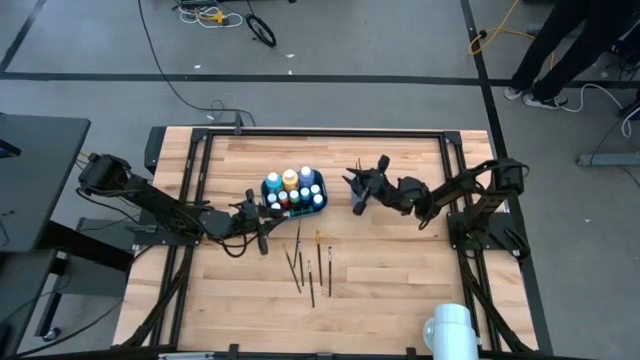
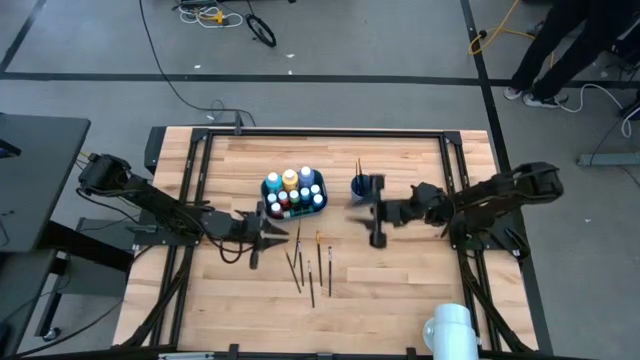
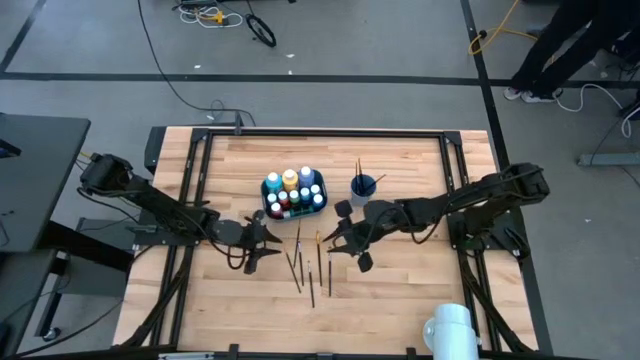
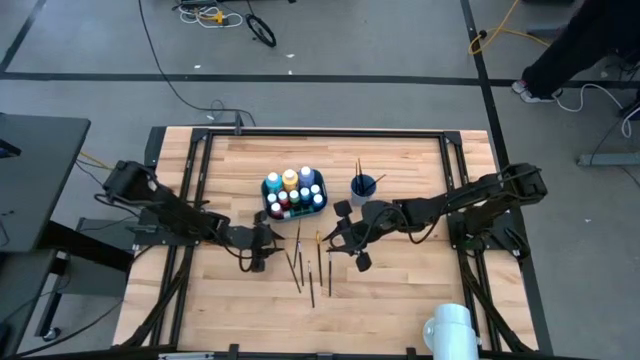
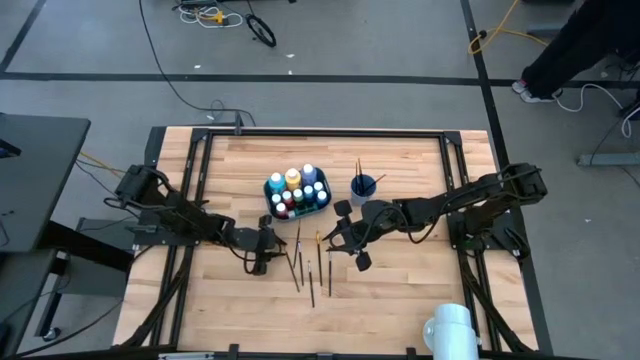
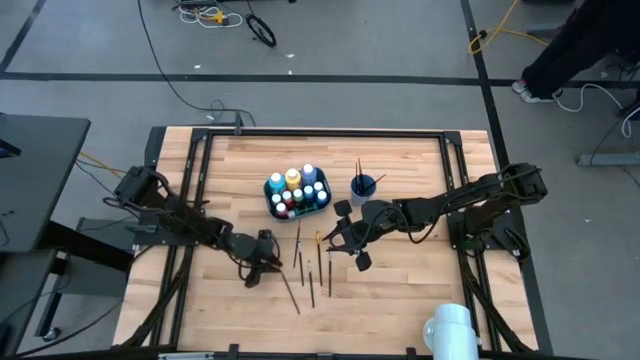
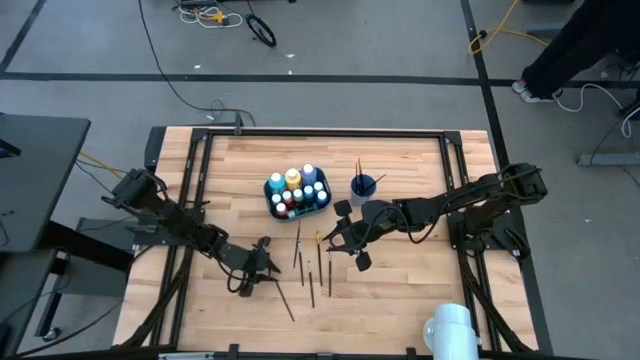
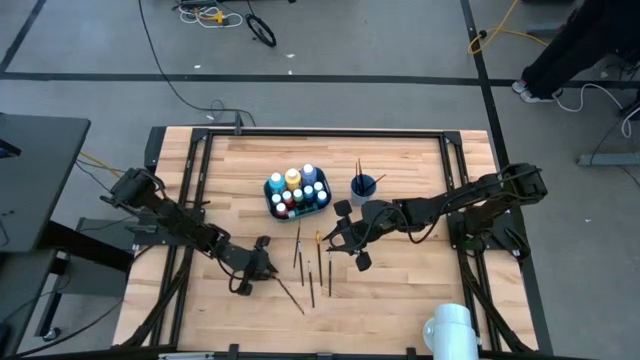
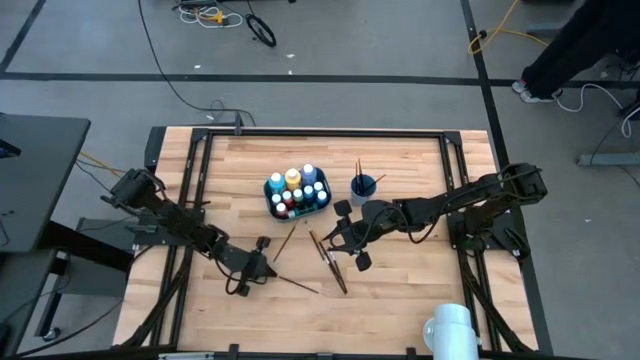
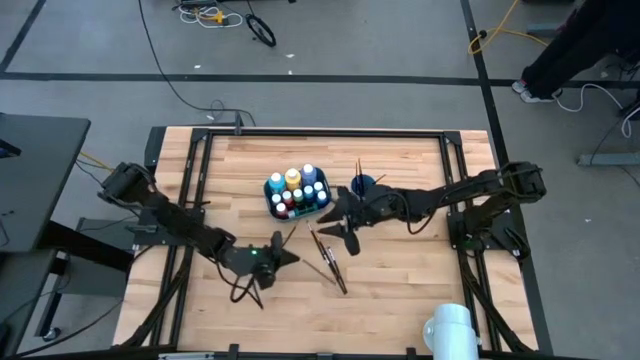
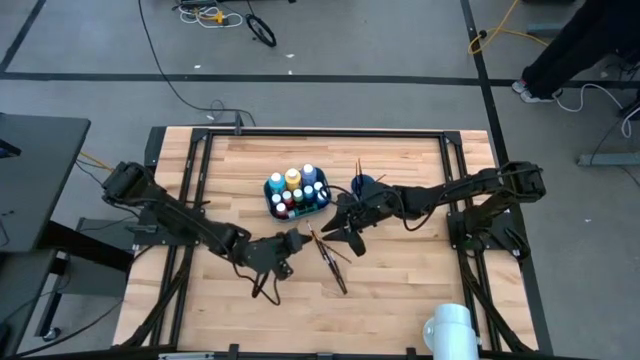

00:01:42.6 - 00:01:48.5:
Task: Pick & Place Paint Supplies
Put the orange paint brush into the blue cup

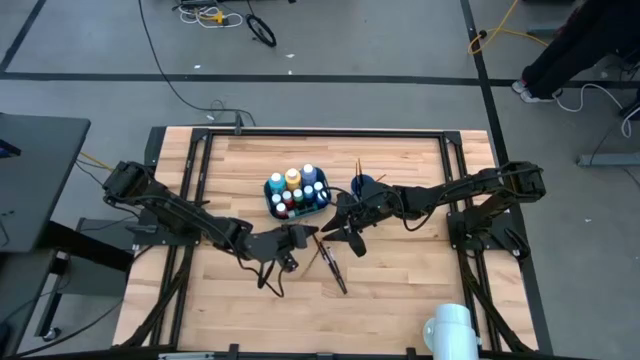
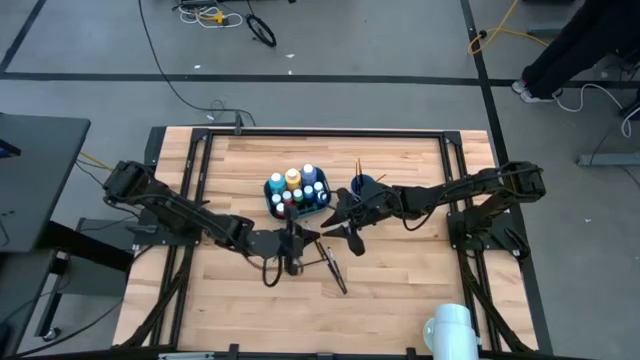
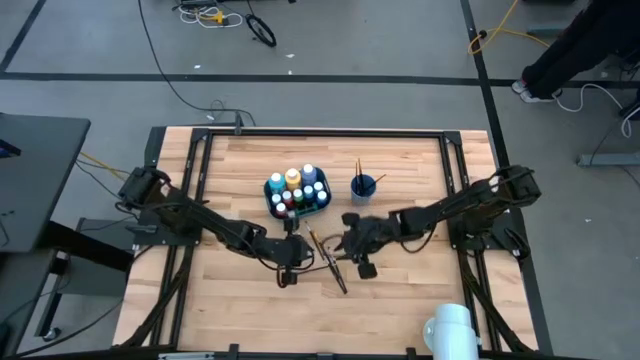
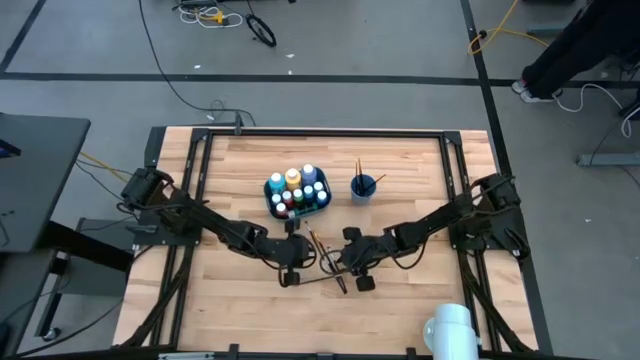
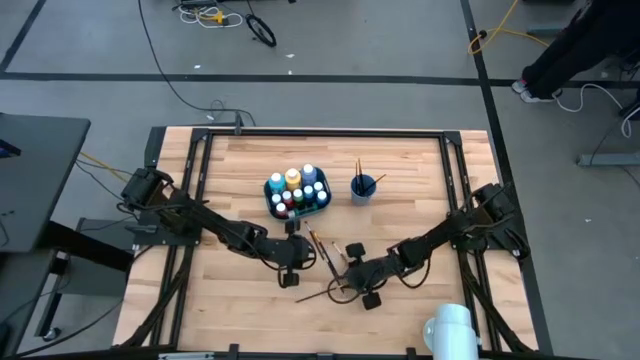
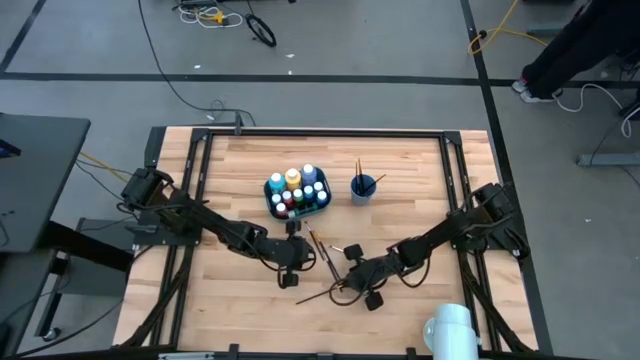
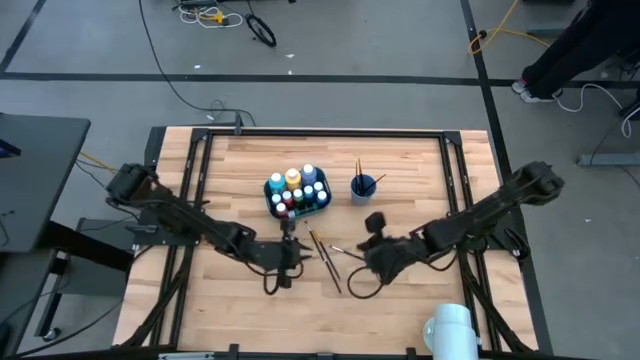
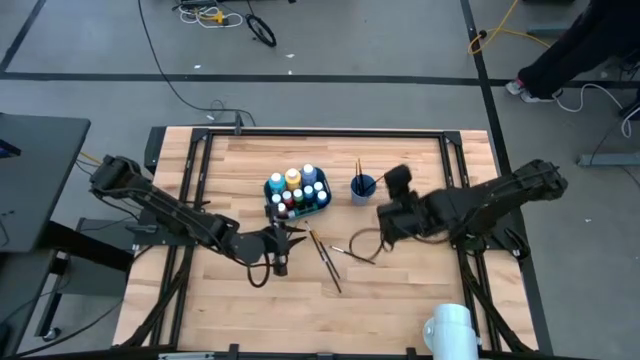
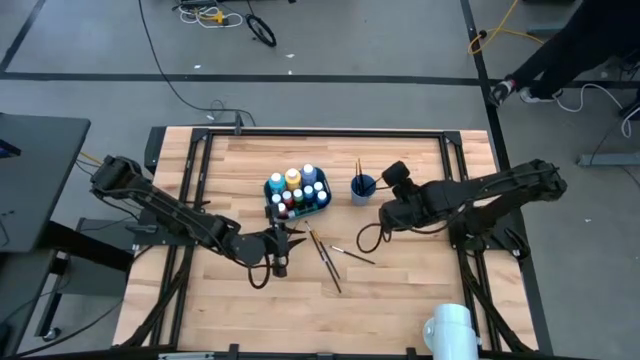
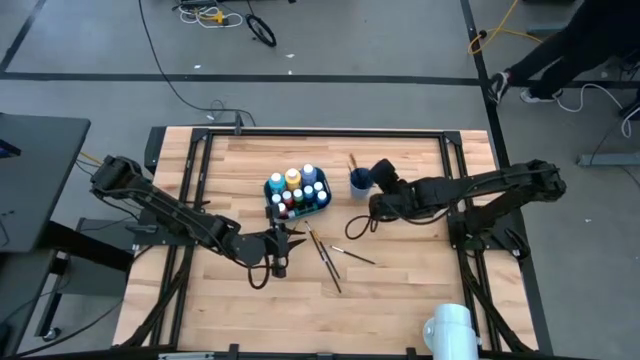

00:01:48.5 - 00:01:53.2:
Put the orange paint brush into the blue cup

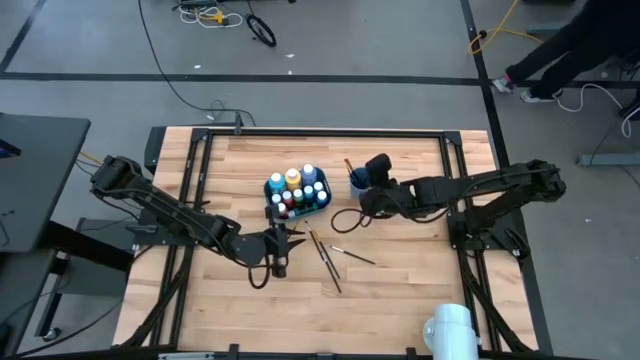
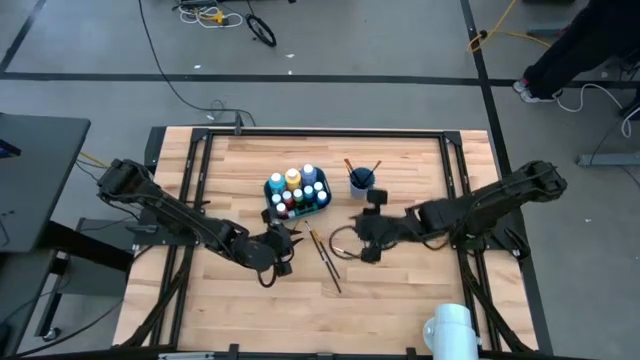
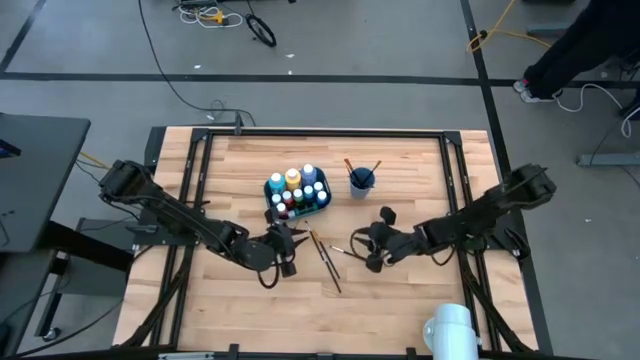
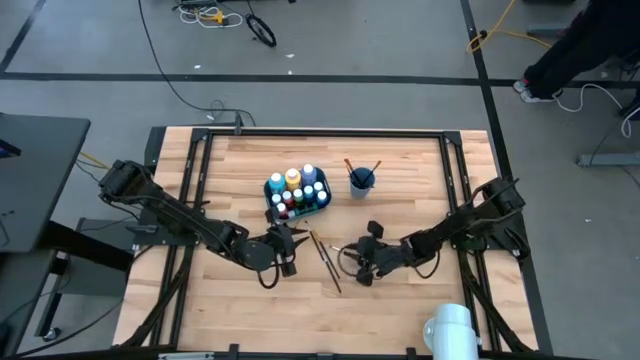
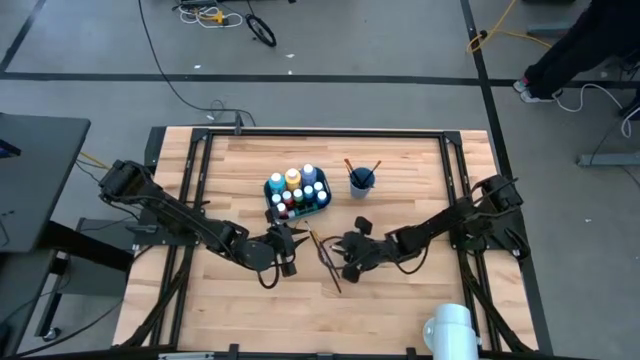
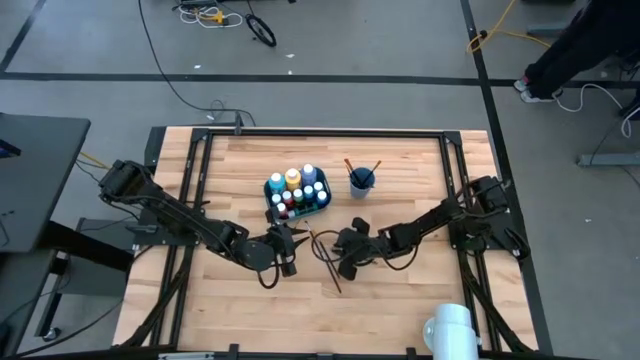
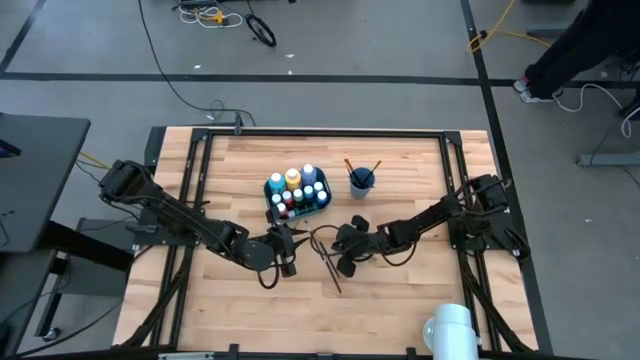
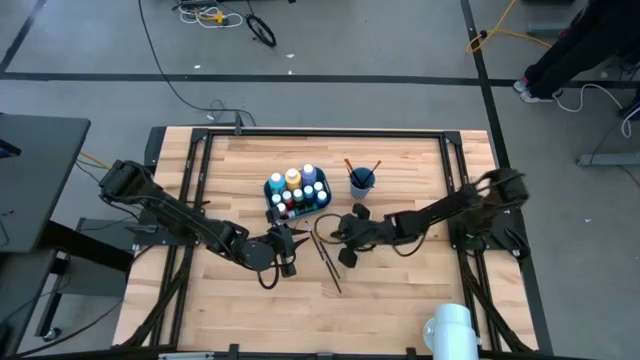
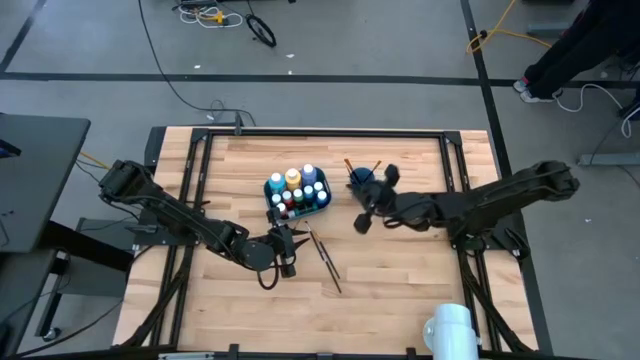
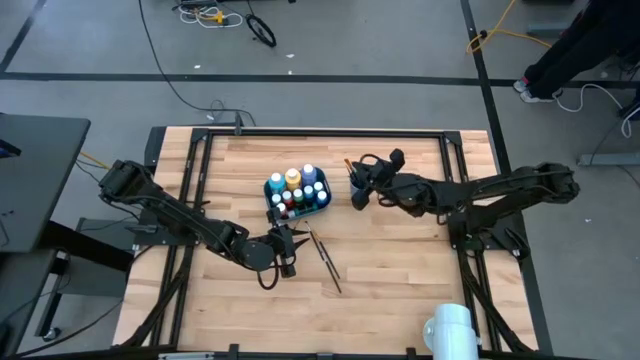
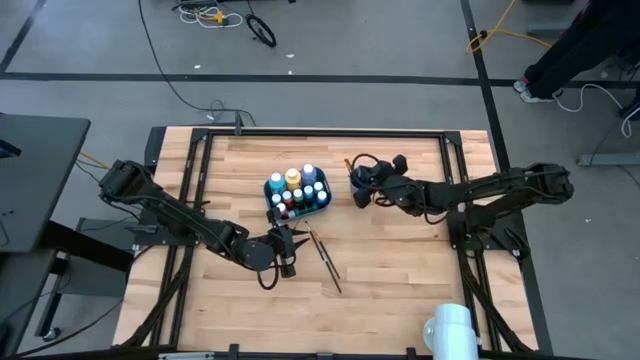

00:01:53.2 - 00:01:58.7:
Put the silver paint brush into the blue cup

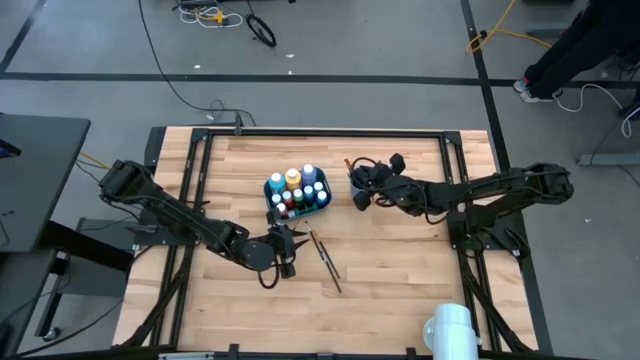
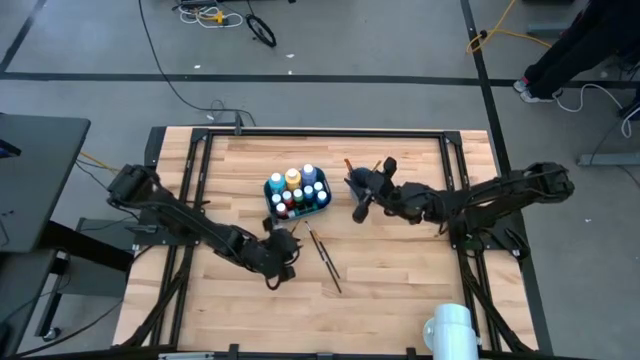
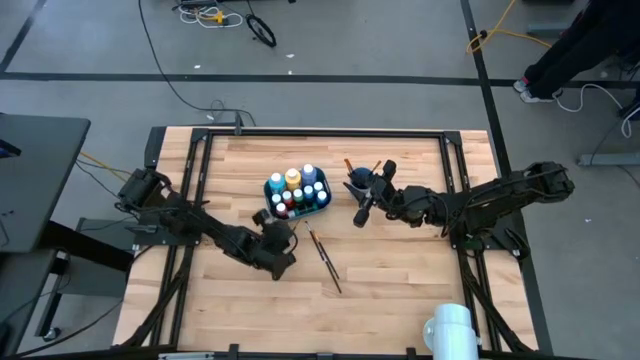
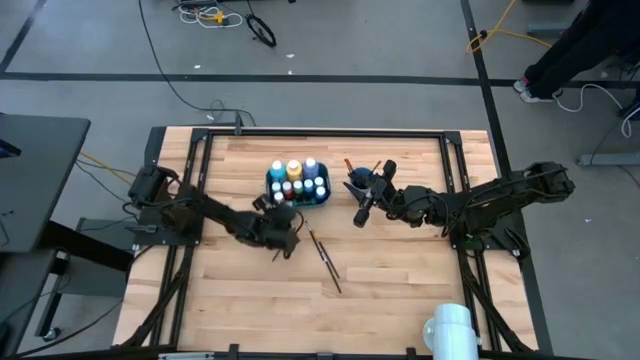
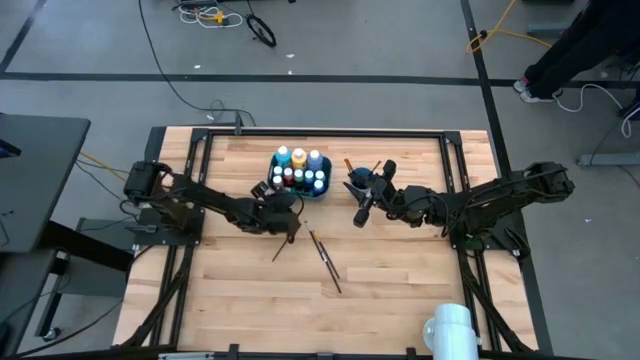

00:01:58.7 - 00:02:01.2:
Adjust the blue bin on the table
